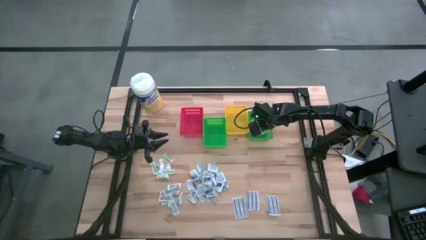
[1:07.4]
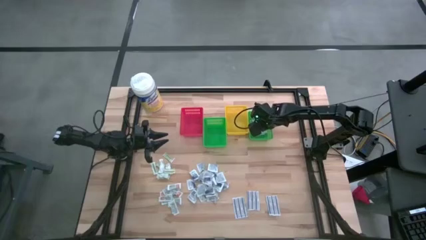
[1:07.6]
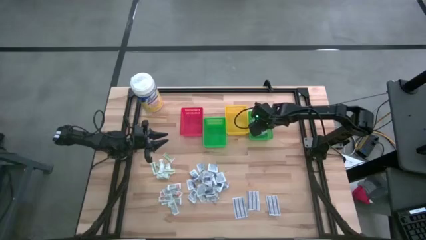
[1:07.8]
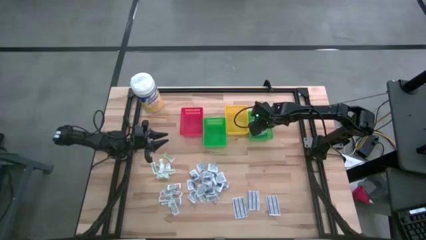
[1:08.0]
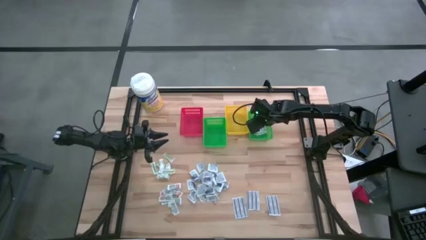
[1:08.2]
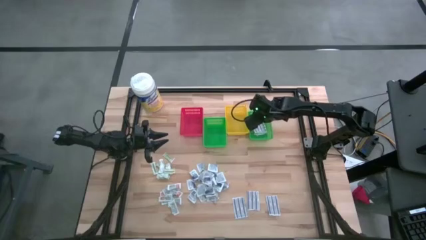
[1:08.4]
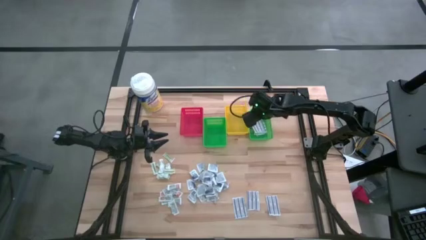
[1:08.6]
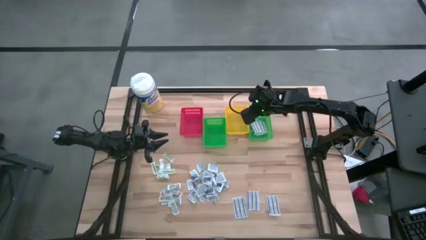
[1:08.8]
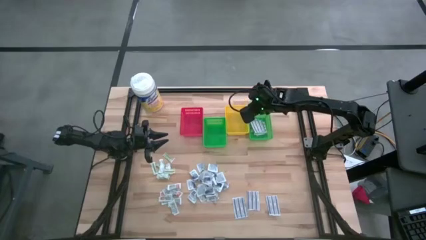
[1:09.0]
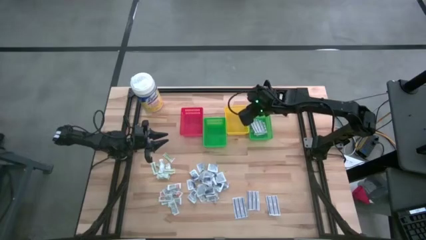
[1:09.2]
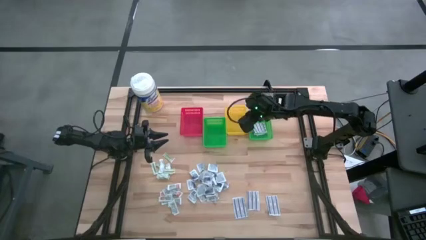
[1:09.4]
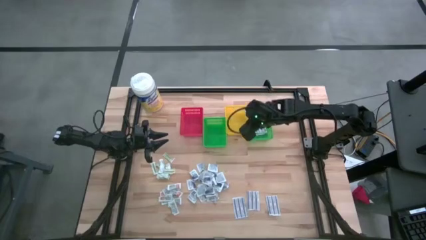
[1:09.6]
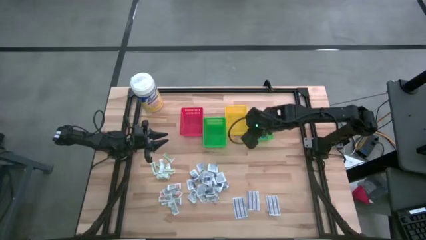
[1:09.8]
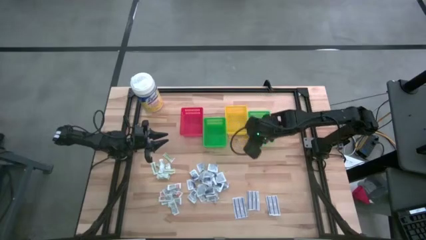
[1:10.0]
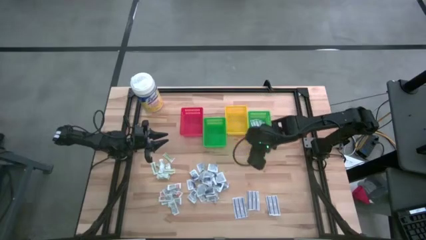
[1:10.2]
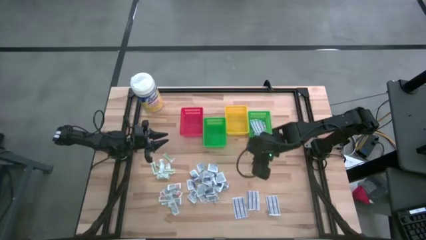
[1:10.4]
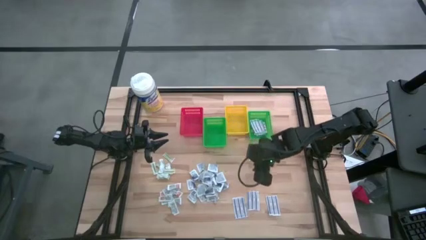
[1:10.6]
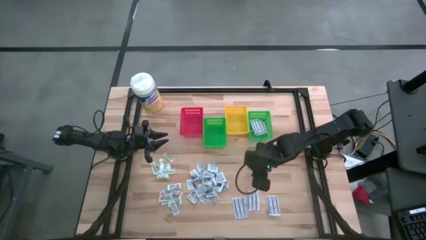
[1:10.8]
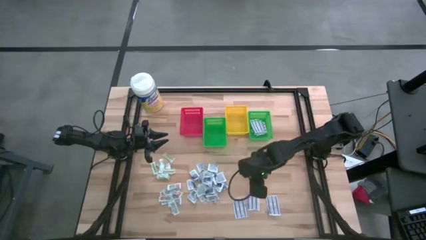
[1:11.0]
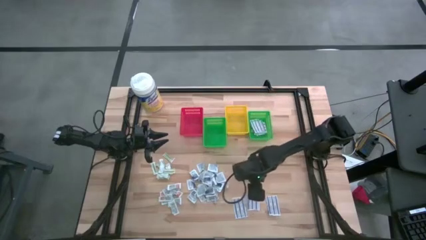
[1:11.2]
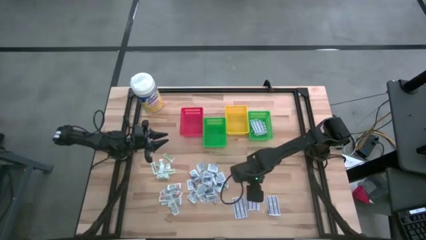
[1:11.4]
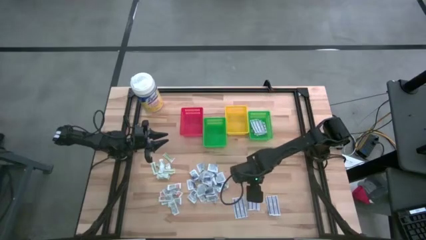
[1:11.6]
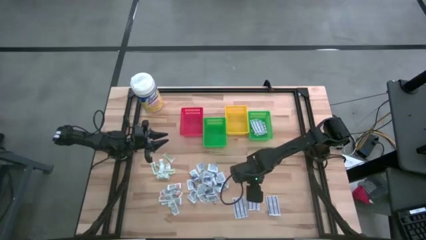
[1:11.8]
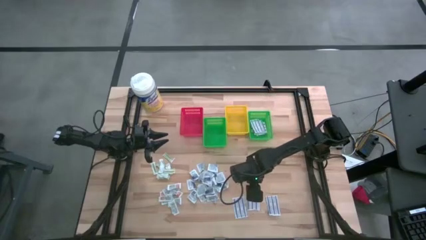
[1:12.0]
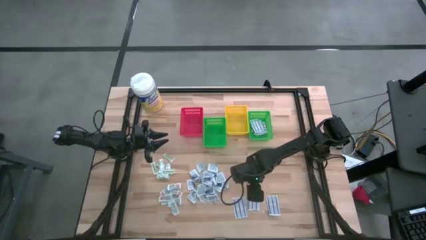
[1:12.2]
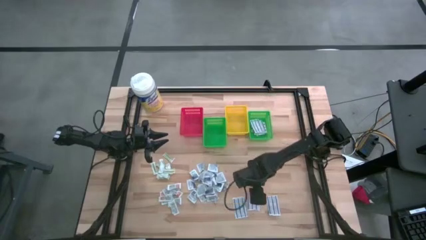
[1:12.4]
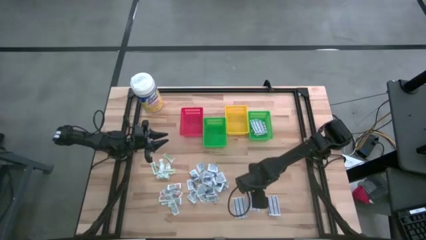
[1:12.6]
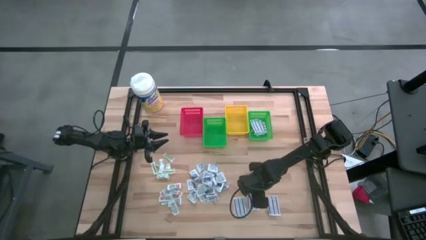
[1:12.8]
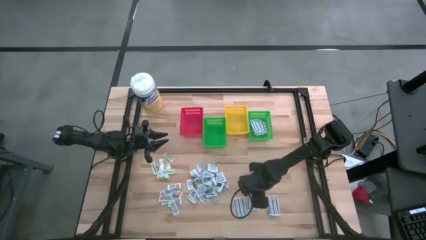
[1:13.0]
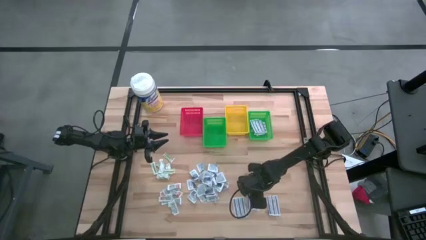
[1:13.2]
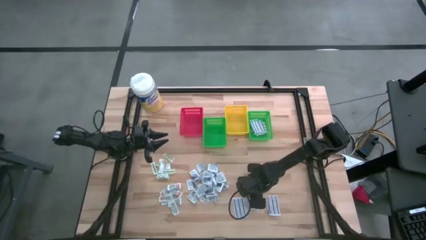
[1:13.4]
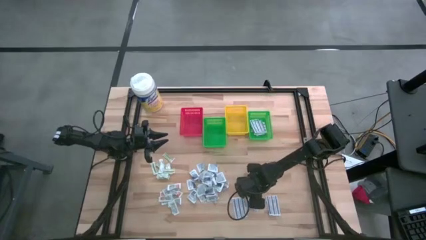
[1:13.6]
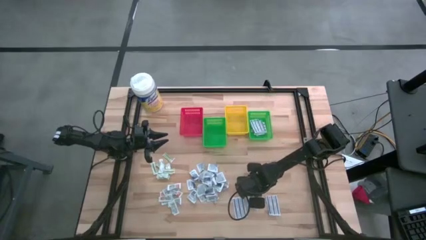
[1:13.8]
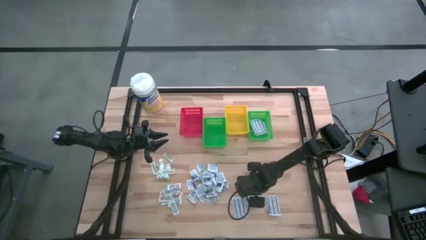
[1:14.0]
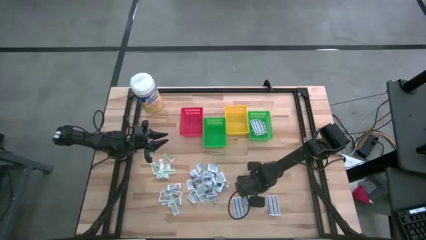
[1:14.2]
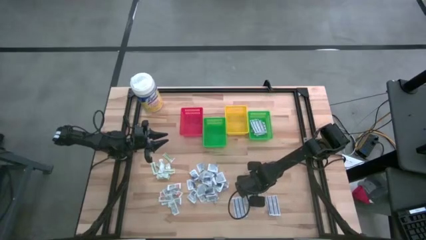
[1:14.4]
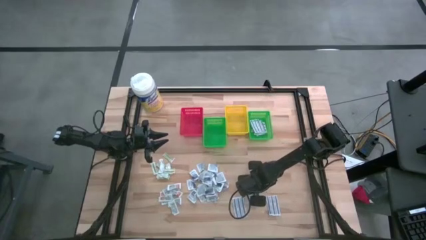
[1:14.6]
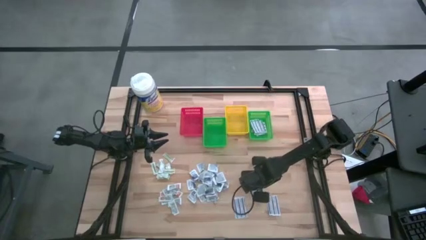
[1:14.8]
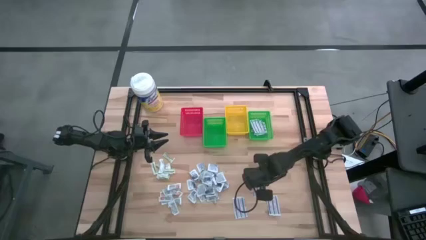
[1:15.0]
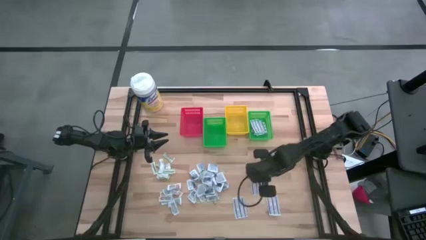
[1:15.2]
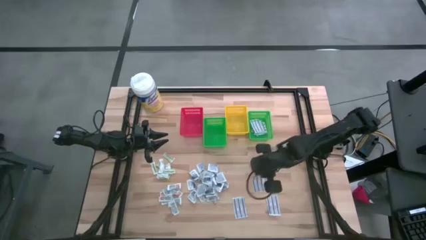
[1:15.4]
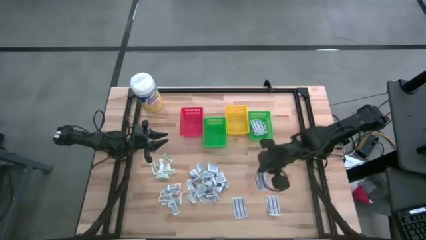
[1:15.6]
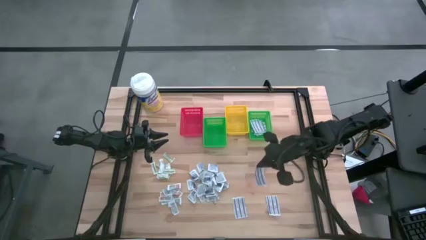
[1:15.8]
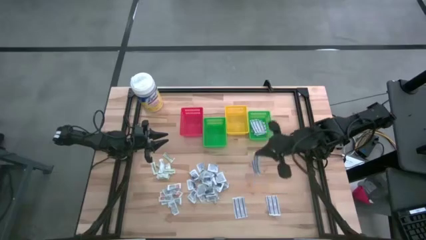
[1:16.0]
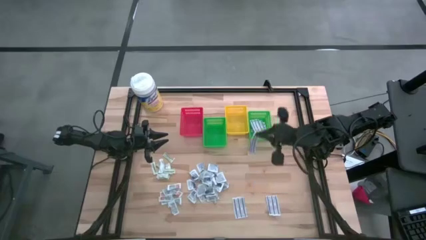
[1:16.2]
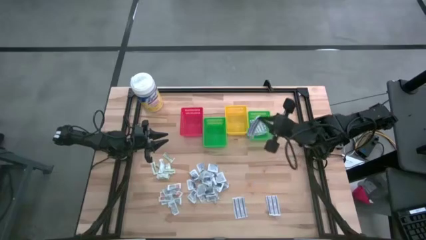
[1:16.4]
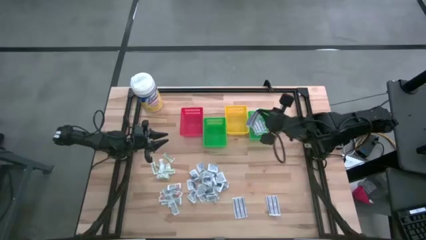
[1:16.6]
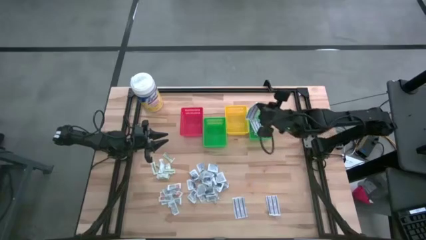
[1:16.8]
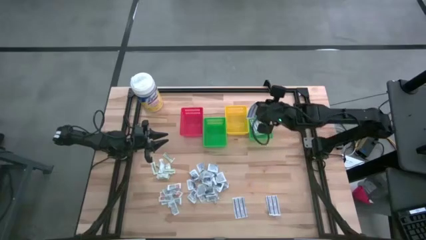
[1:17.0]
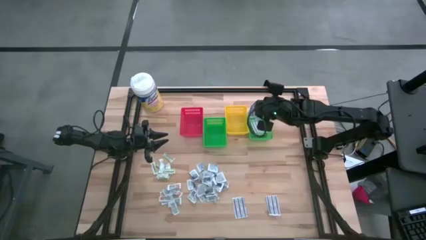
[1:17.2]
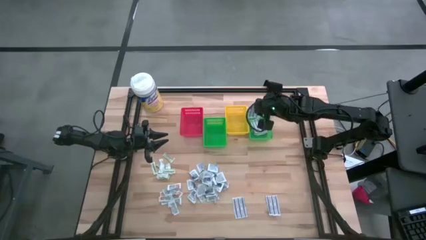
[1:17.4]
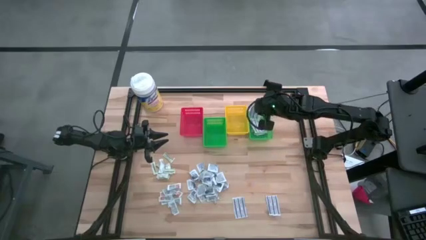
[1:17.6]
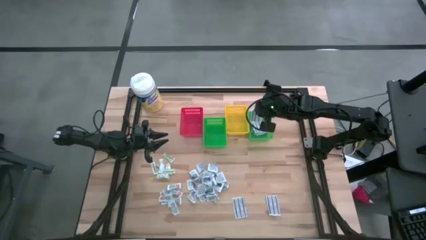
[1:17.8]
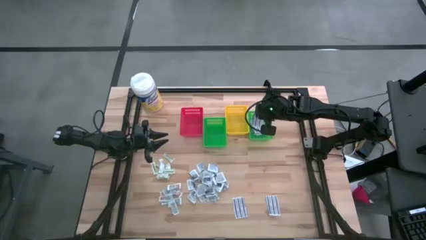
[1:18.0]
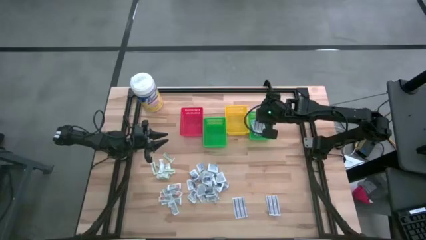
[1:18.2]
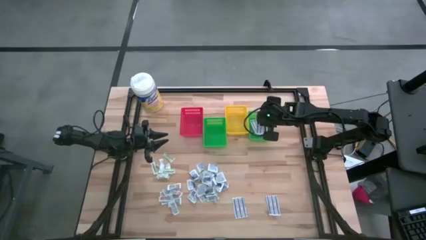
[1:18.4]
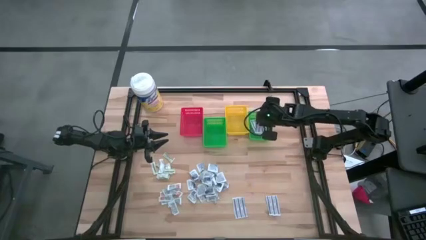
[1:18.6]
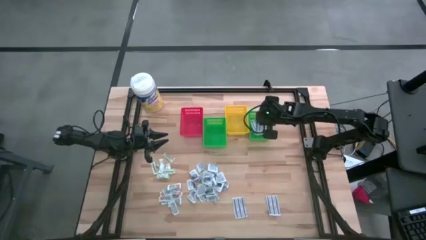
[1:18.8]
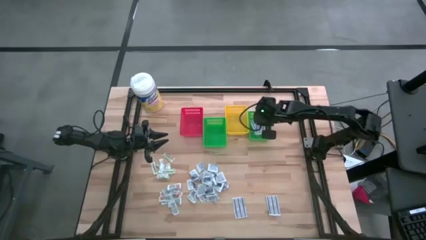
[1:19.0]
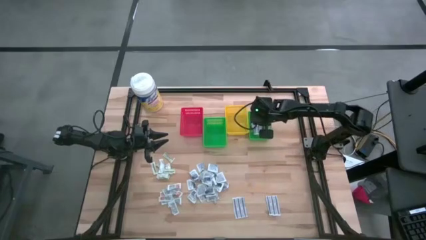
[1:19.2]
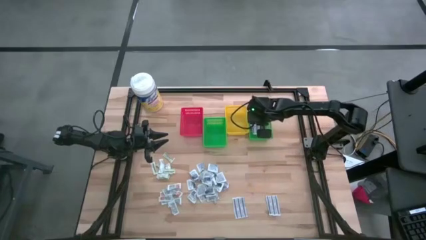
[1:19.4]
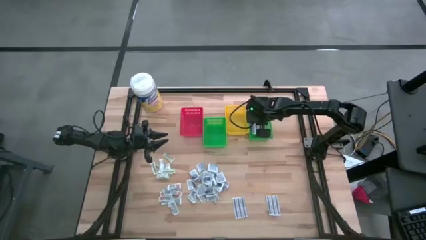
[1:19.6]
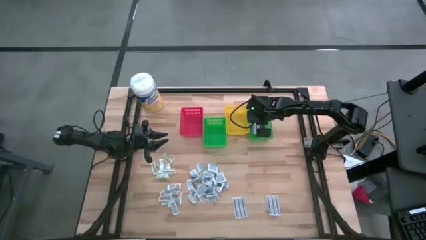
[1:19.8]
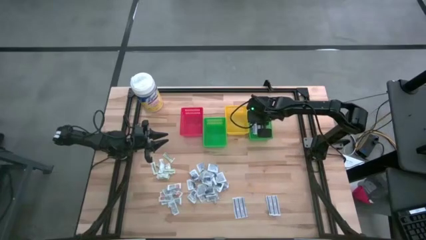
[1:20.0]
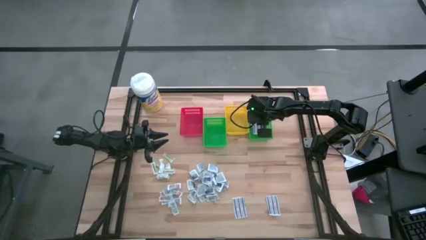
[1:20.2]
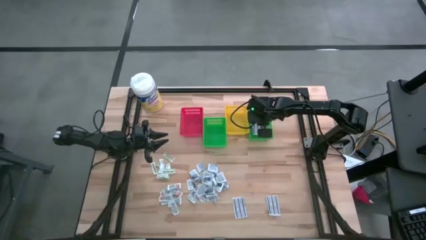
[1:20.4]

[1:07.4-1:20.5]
Task: Pick & Place First Aid Supplies
Put the blue bandage into the right green basket

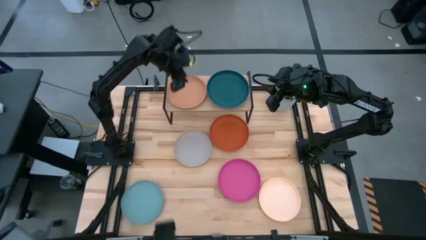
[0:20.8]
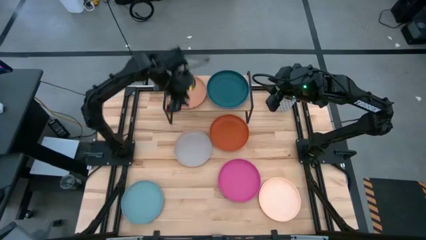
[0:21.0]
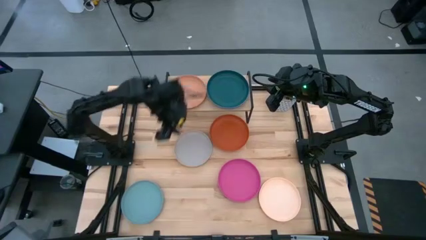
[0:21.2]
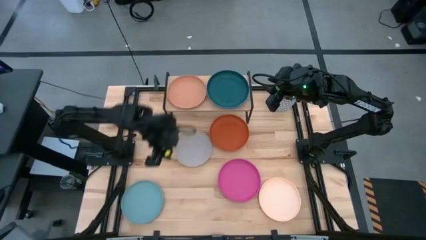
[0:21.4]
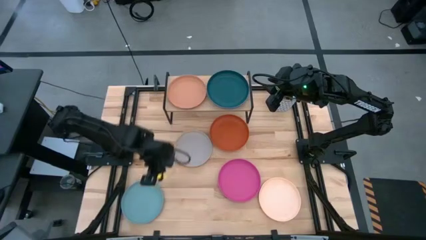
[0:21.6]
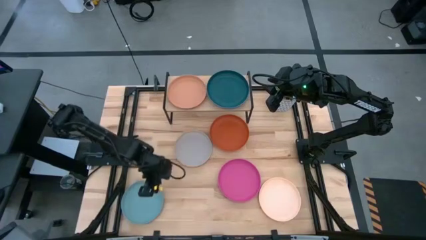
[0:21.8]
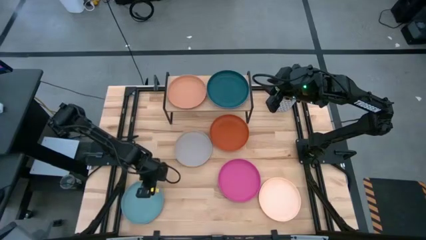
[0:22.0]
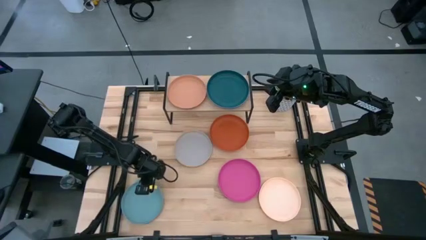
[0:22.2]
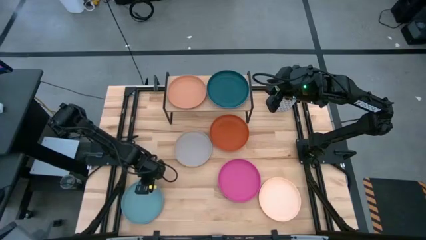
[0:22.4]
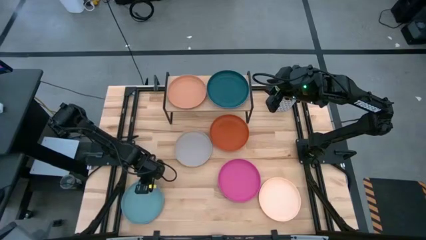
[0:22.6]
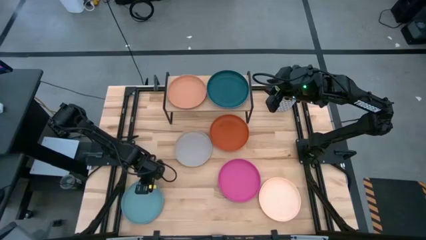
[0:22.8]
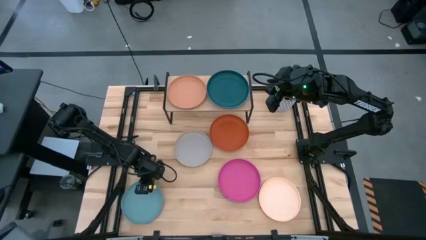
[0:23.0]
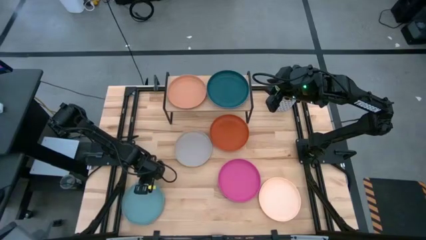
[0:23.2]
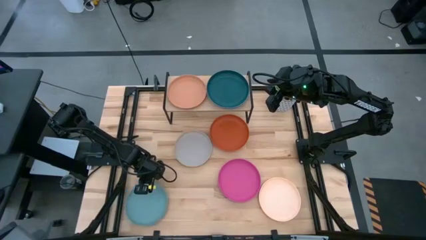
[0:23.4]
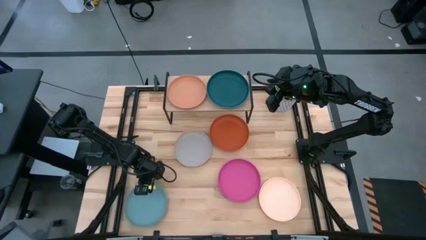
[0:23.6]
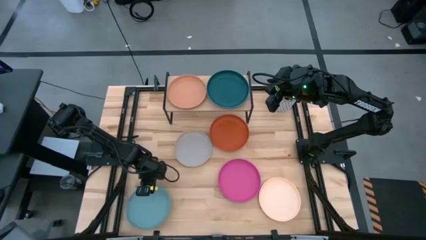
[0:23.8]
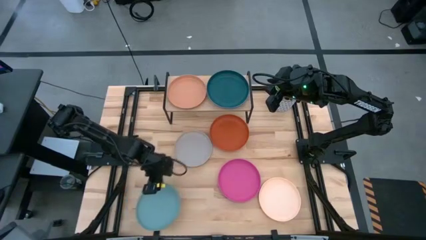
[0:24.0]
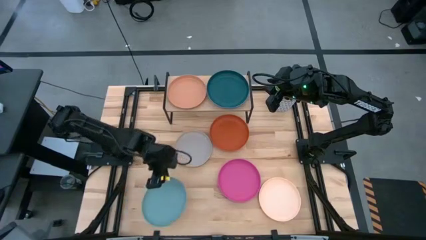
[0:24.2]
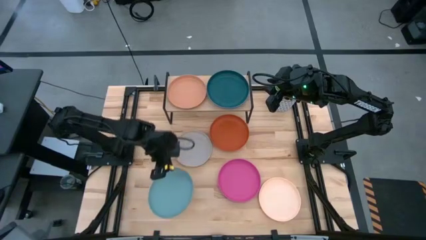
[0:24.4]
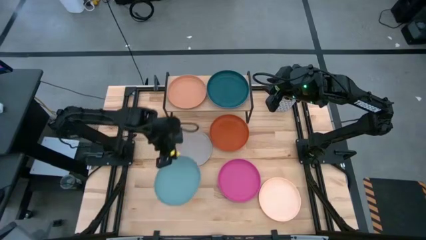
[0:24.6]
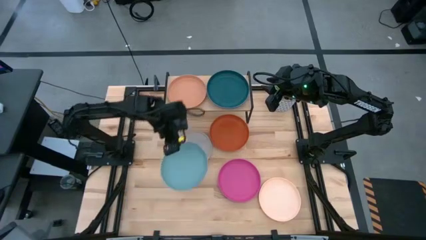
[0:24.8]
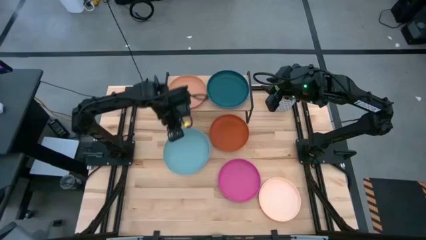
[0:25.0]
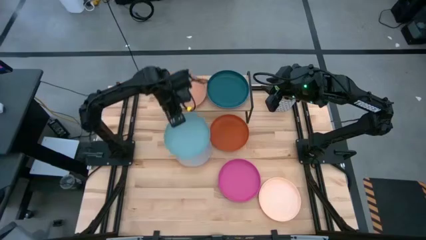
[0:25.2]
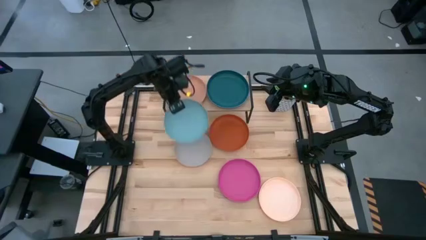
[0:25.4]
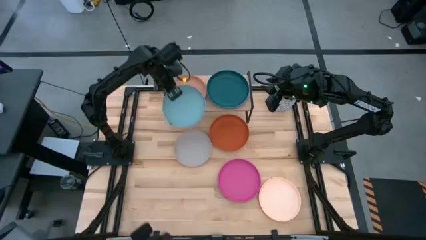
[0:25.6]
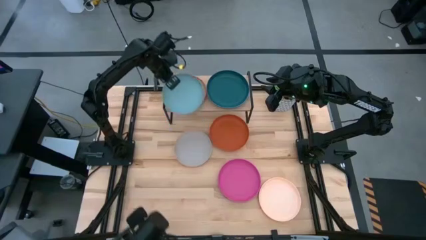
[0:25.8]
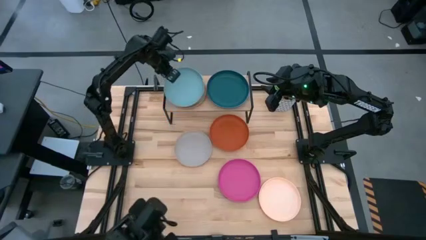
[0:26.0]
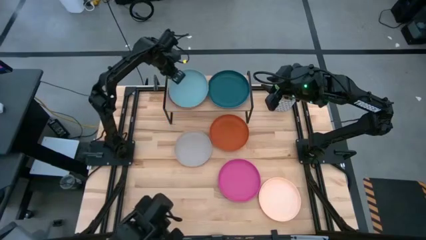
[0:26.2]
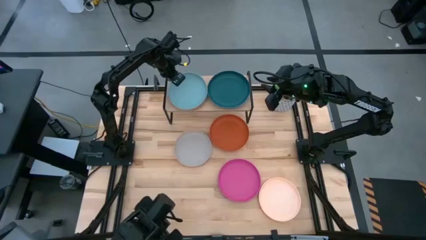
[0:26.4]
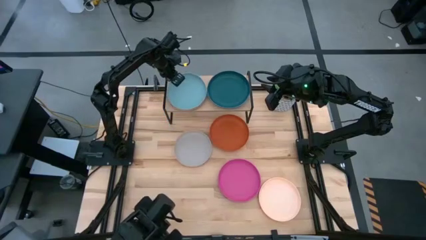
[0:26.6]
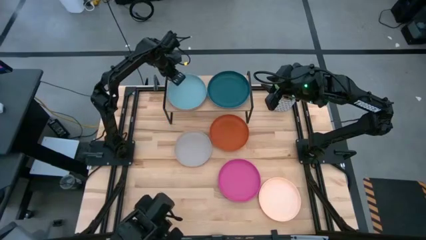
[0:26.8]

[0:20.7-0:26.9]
Task: Place and stack plates onto a shelf
Stack the light green plate on top of the brown plate on the shelf
